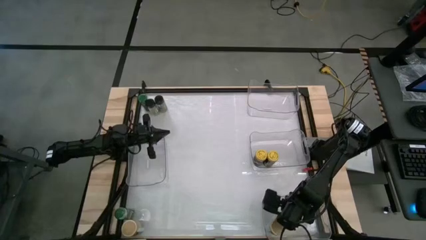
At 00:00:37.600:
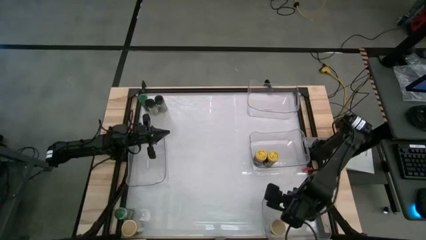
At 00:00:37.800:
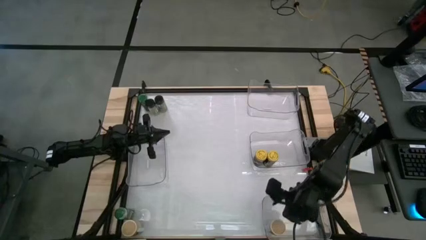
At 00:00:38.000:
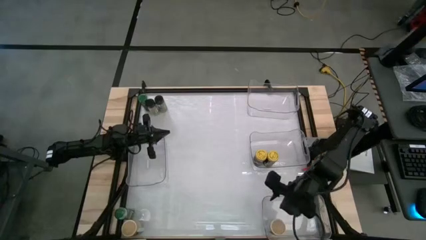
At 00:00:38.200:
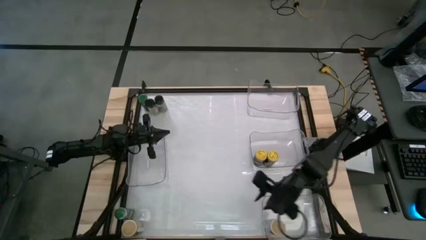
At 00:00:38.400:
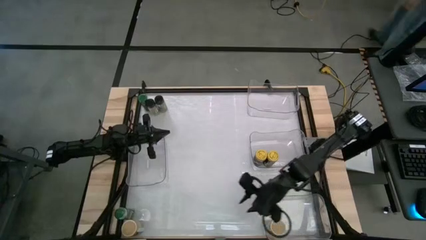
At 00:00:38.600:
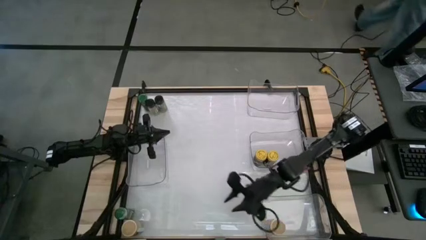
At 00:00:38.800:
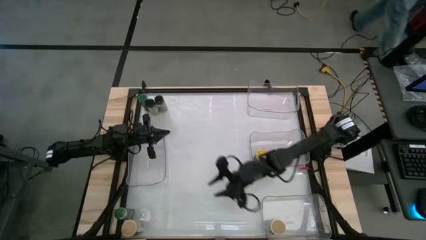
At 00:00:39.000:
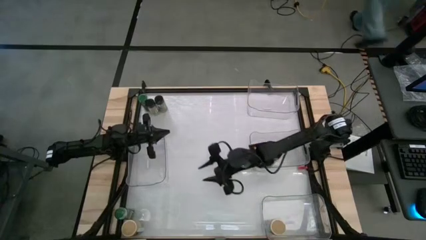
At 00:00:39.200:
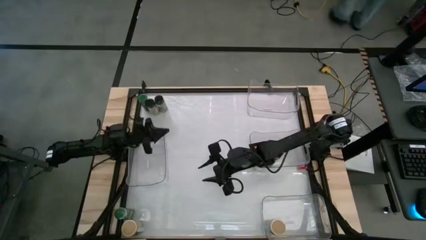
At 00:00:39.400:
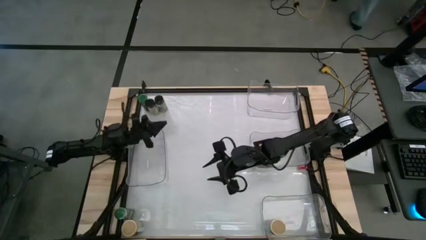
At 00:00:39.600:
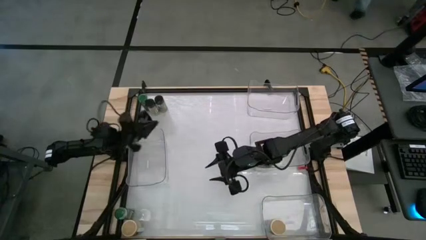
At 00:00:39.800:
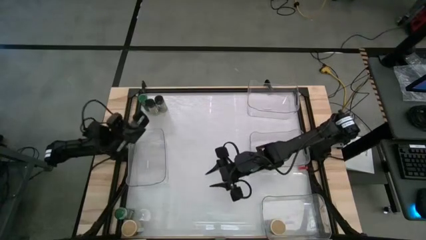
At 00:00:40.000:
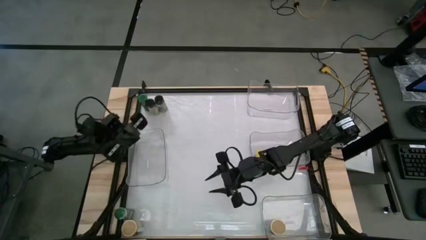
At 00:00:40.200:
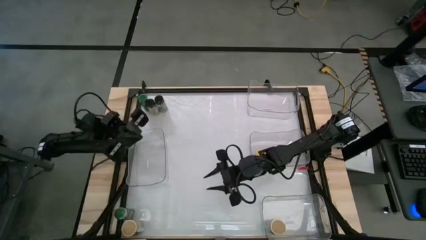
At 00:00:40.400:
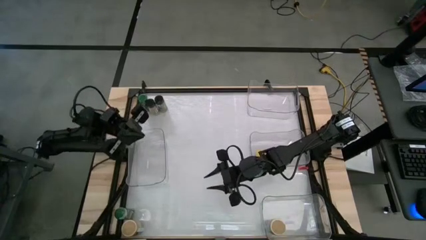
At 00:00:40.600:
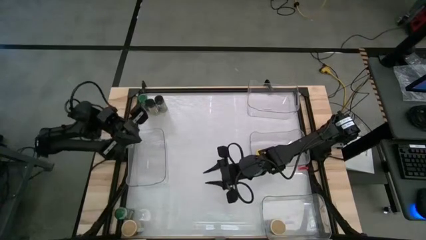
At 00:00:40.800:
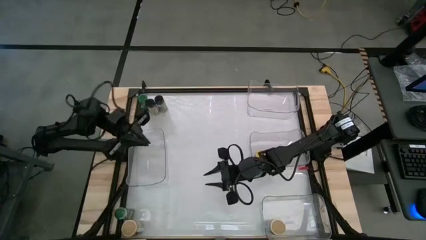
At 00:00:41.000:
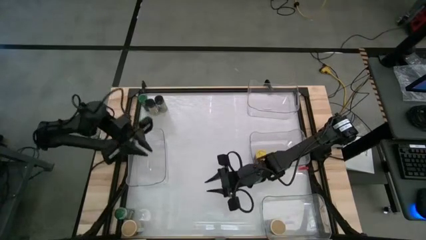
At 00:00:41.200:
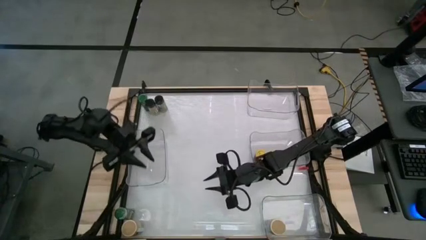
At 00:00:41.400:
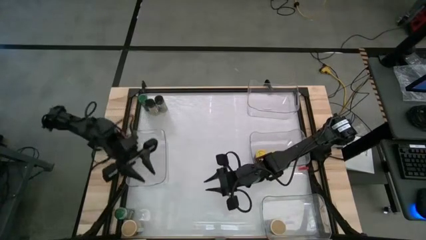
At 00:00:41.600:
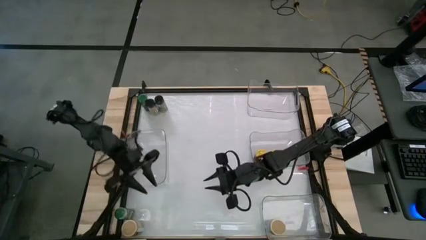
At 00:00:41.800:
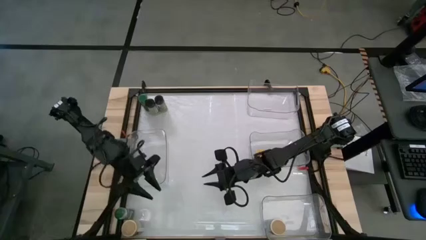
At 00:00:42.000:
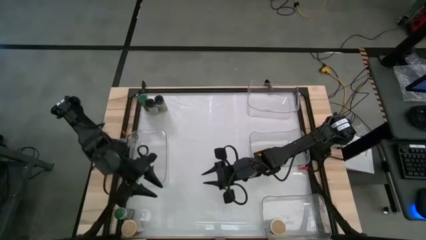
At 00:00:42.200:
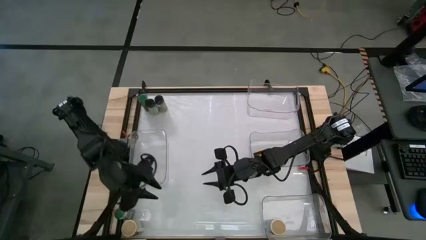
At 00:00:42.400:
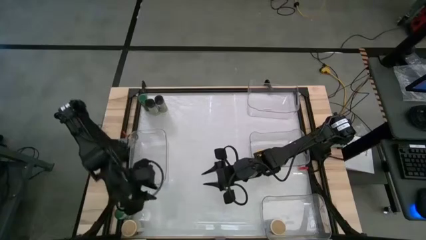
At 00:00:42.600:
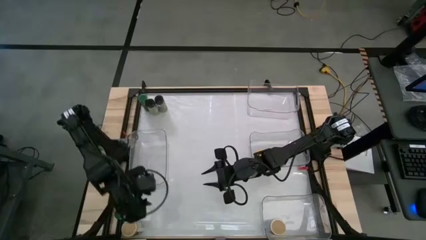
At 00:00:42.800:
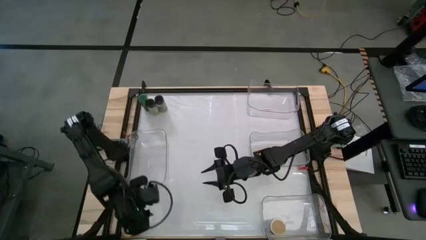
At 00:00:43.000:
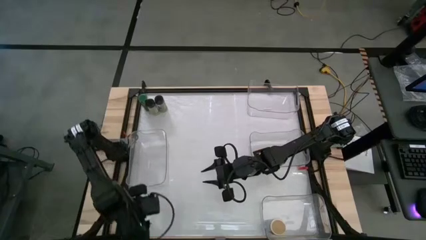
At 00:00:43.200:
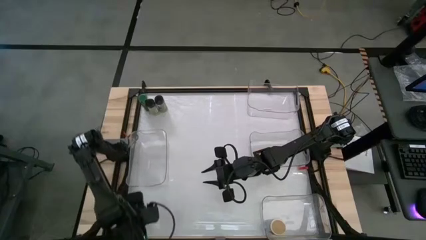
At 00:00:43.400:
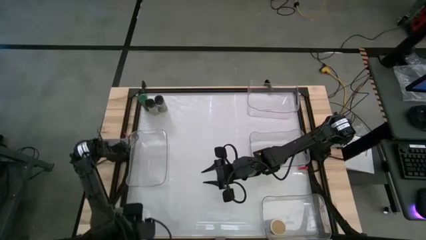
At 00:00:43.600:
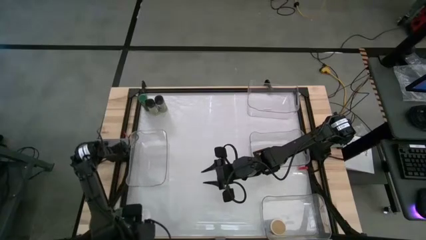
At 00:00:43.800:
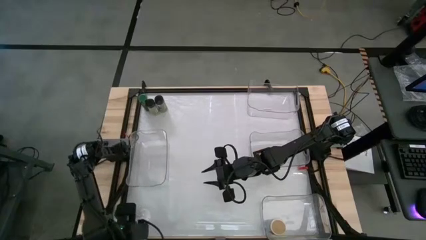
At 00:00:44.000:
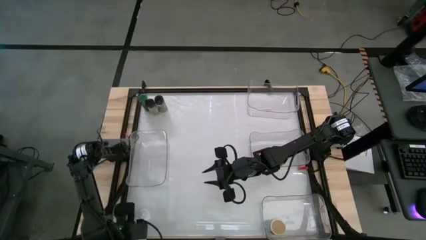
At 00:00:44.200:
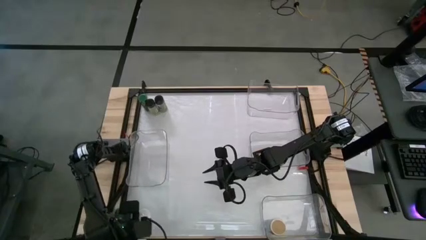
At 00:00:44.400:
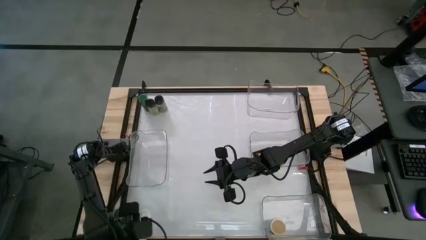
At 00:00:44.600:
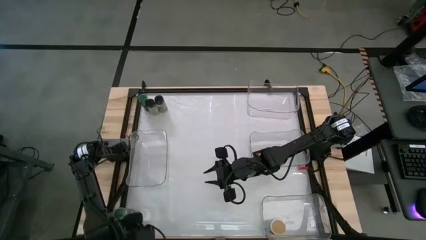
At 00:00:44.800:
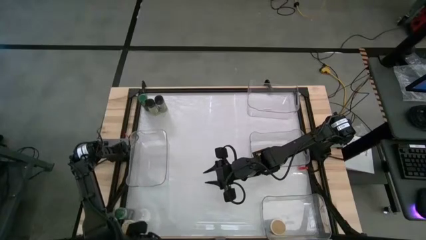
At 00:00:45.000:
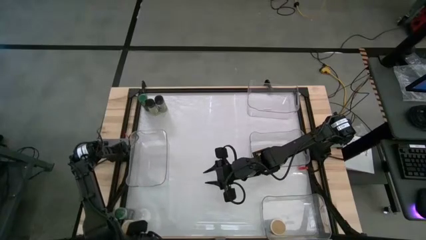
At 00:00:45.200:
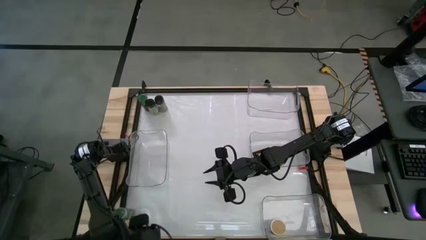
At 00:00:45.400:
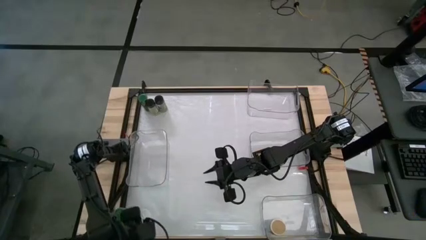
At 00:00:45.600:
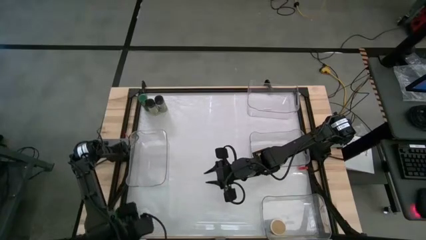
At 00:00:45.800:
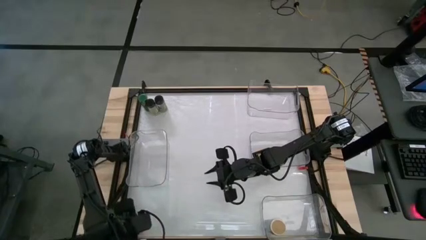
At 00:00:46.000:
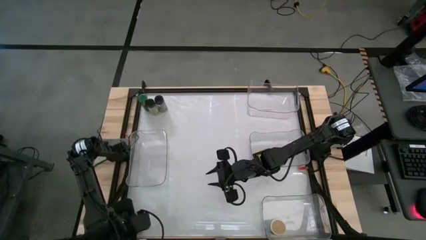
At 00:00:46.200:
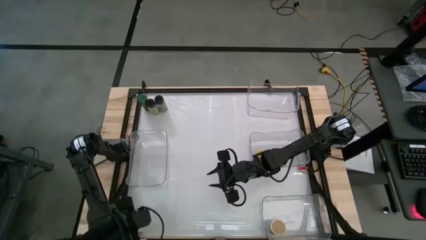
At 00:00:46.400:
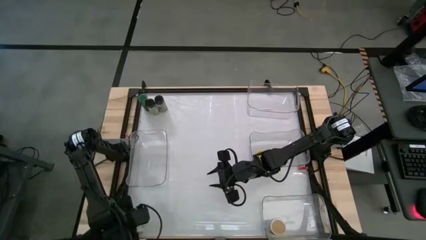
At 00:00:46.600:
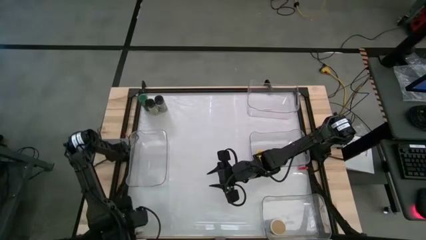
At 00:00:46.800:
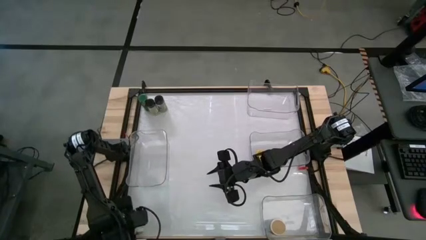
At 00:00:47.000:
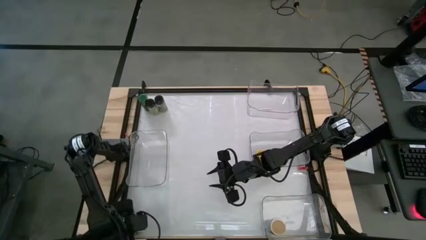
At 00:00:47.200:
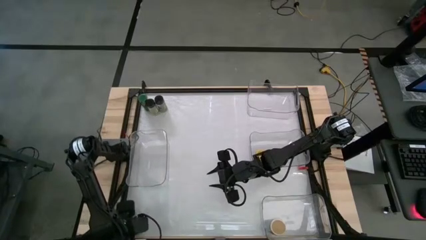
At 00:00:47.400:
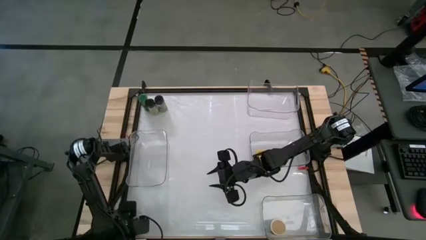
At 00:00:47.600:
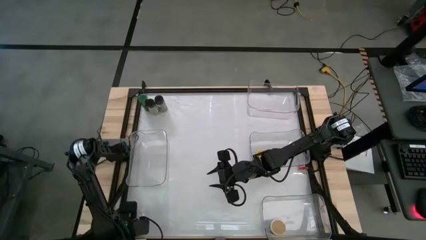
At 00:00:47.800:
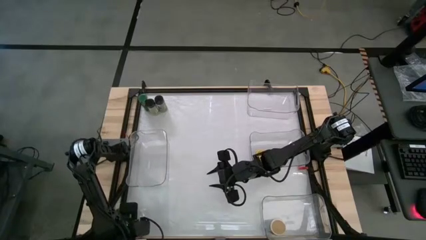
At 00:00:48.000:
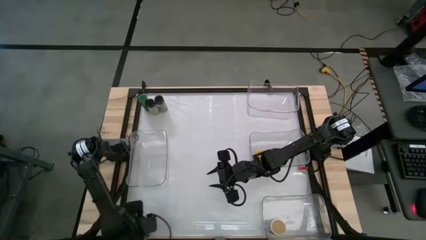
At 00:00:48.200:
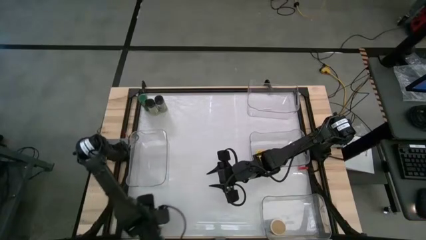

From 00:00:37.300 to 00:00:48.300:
Task: Sort spices by type
Put the brown seasoning bottle into the bottom right transparent bin
